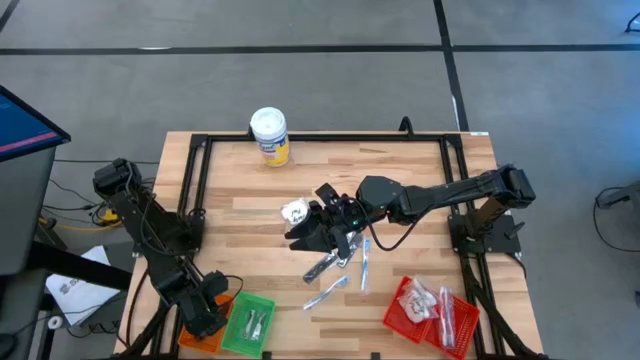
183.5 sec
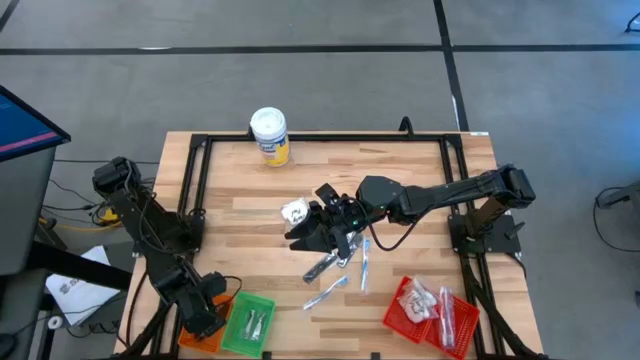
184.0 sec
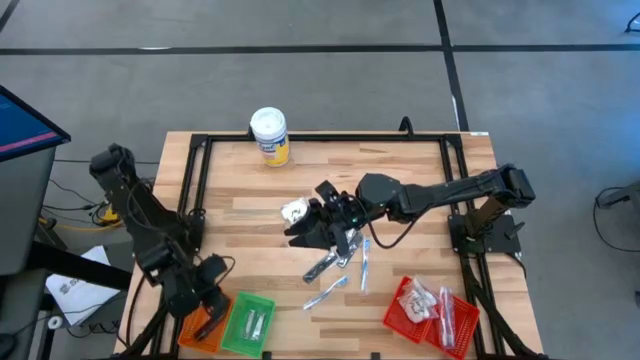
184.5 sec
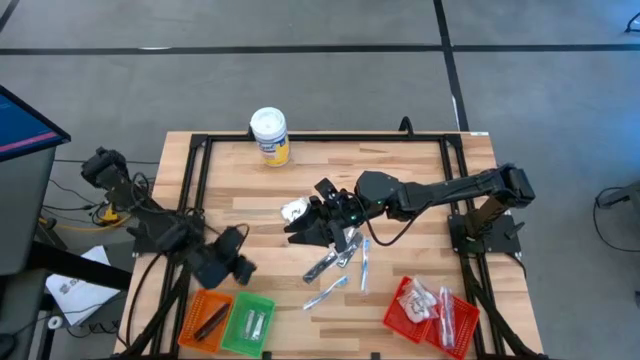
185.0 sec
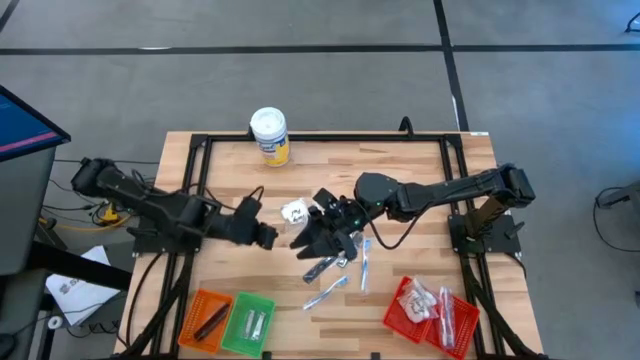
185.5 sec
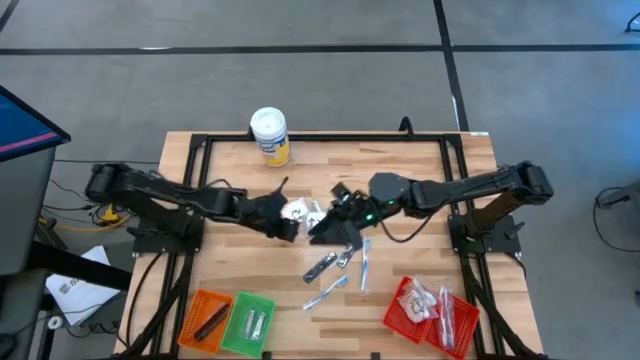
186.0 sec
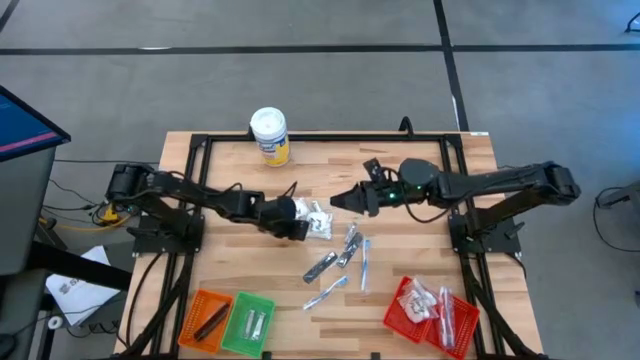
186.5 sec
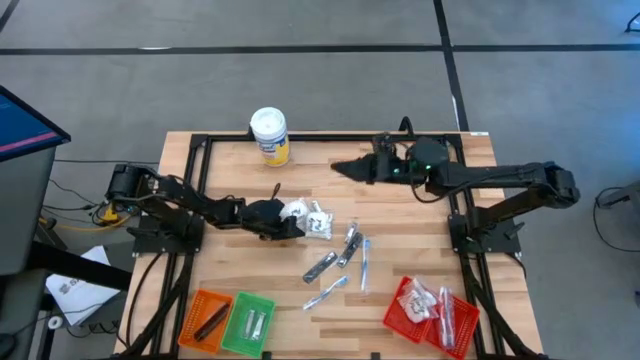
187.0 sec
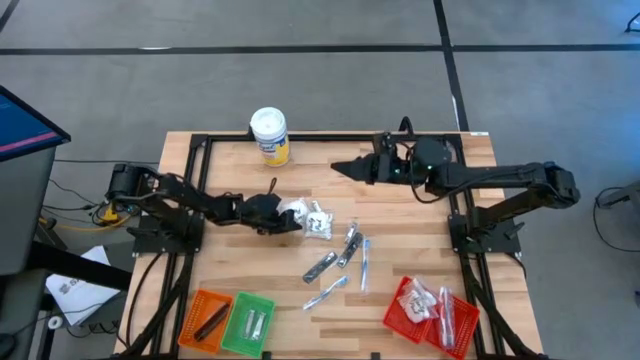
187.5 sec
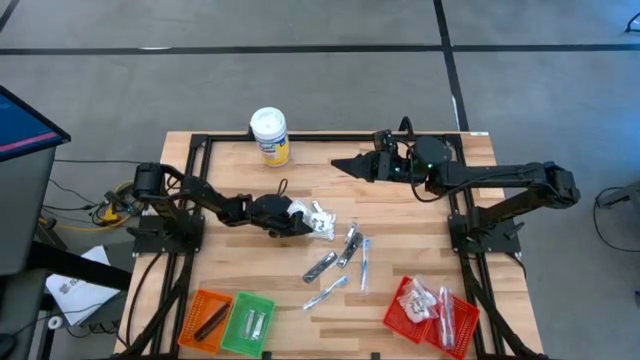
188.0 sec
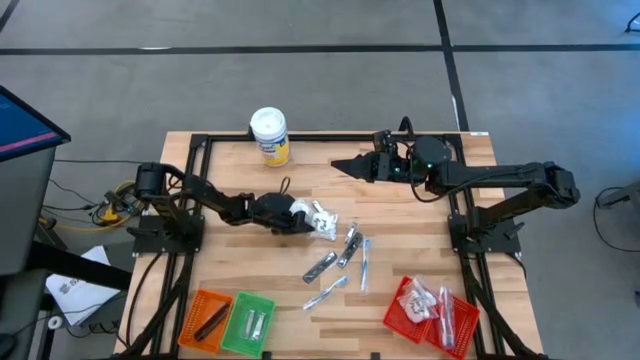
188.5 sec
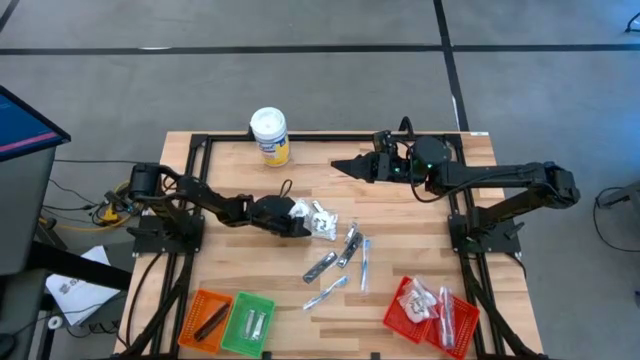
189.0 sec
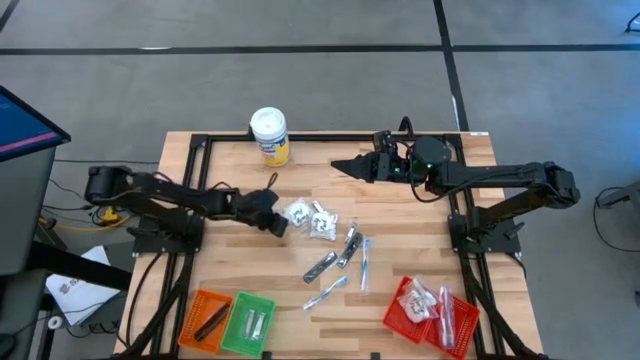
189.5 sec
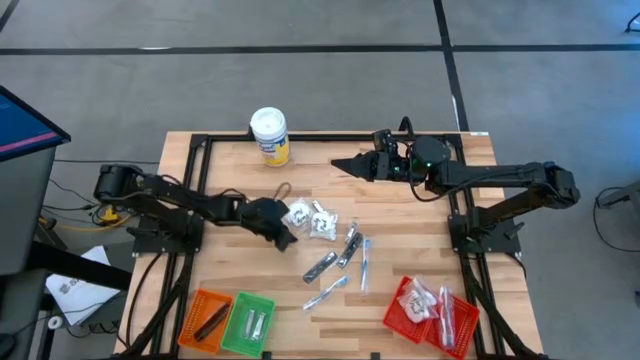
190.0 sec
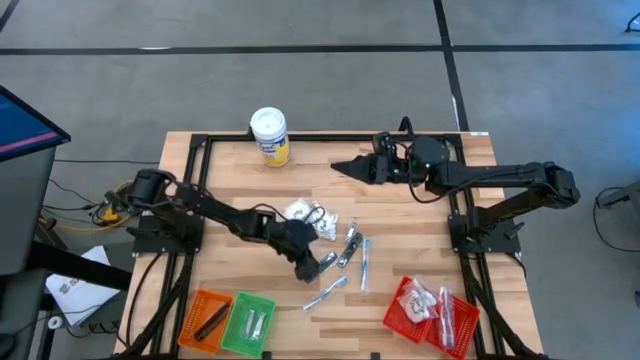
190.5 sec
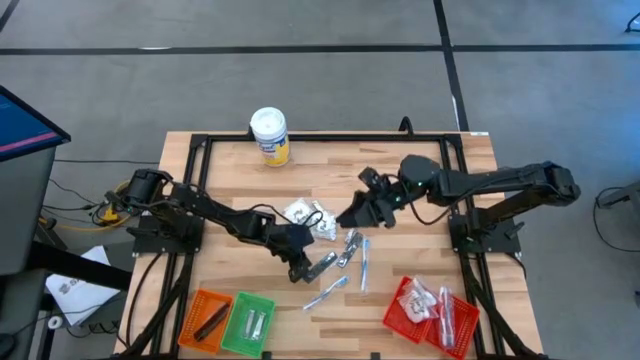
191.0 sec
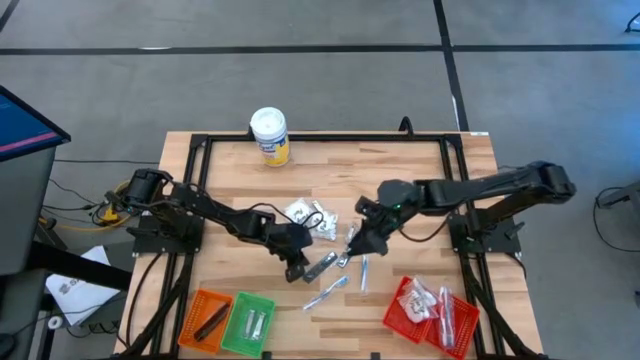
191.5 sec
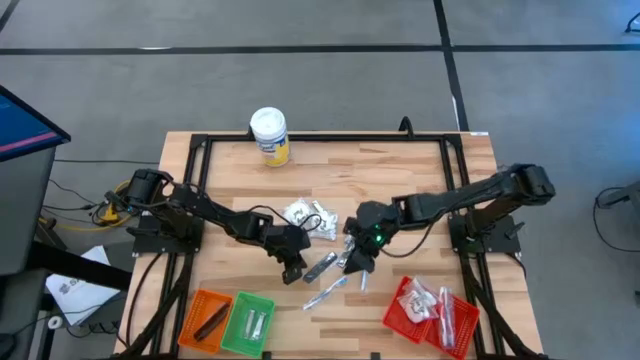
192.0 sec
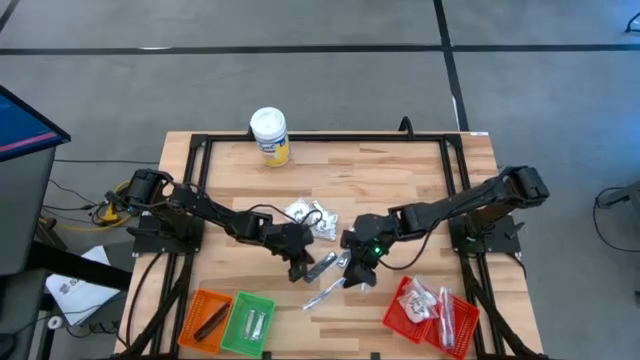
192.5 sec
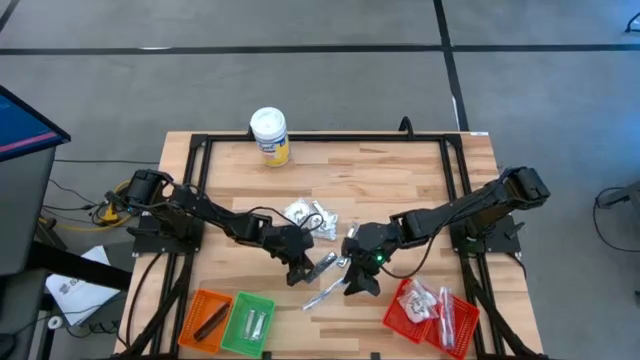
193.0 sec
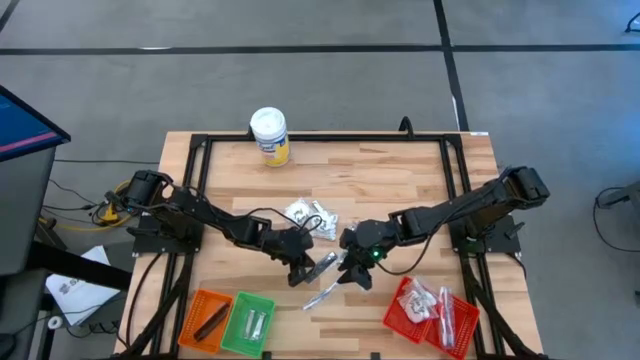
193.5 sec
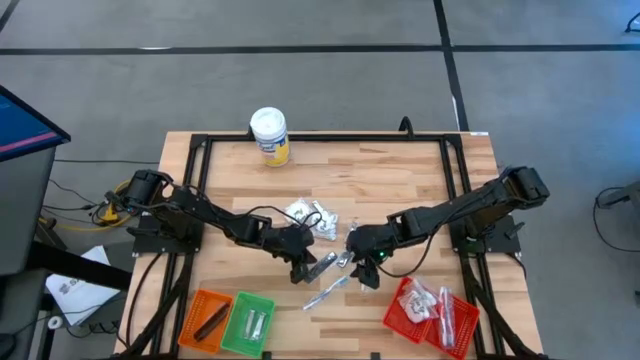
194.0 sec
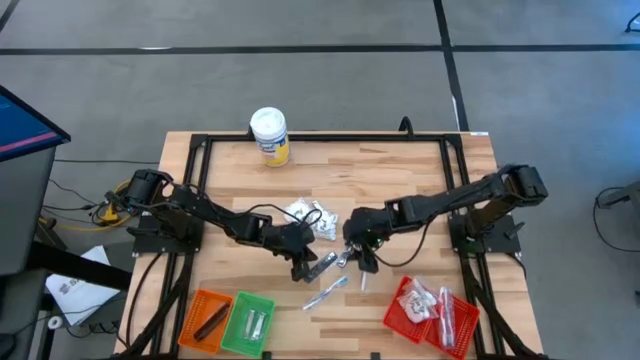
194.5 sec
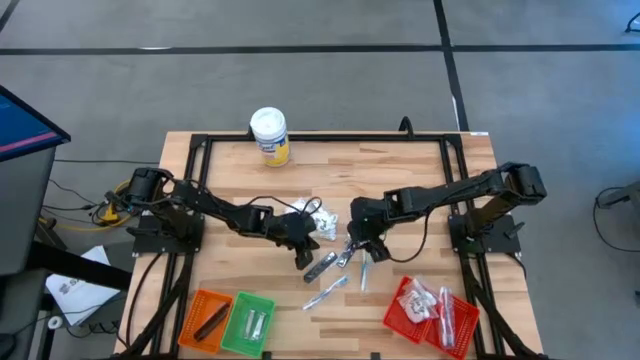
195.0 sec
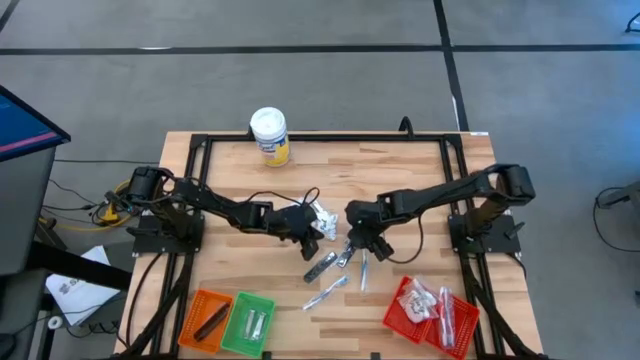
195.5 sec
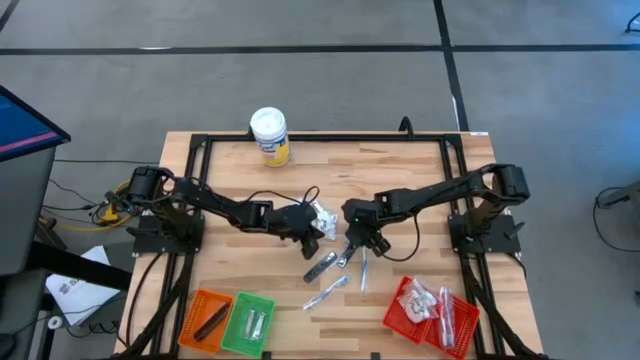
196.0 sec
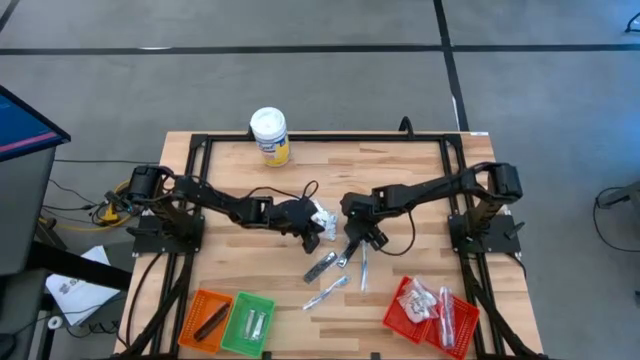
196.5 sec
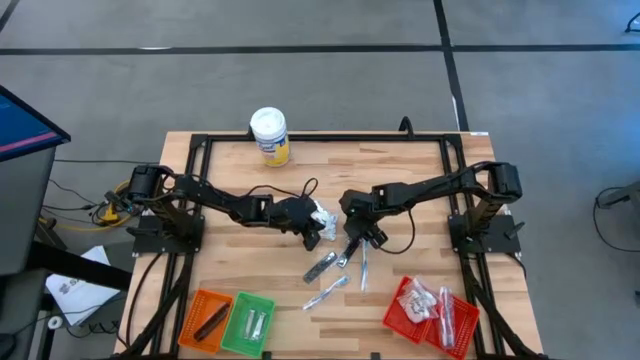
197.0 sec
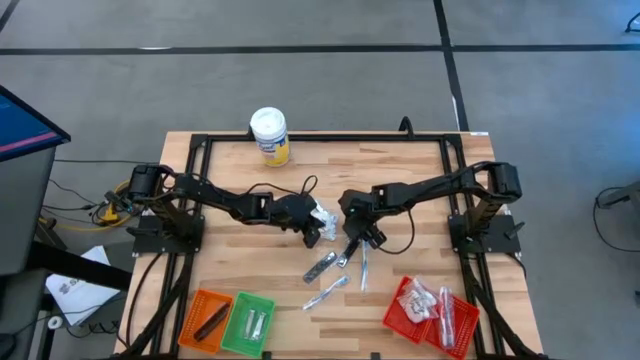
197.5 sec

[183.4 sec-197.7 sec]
Task: Pick & Place Travel size toiletries
Put the nail cutter into the green basket

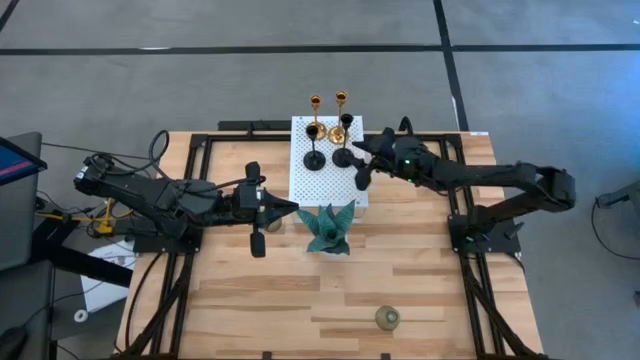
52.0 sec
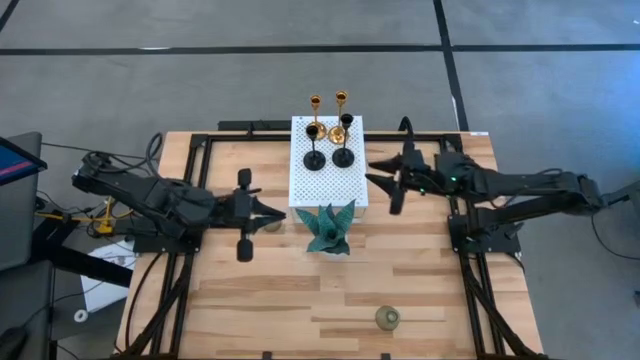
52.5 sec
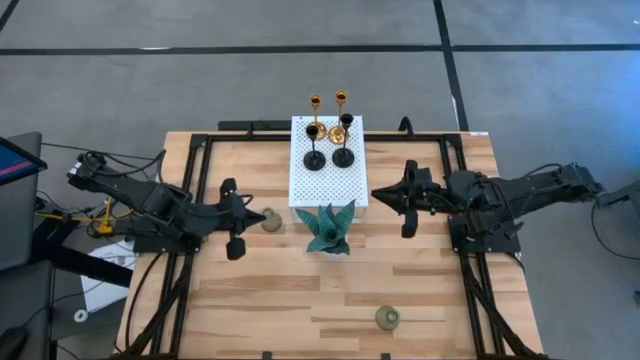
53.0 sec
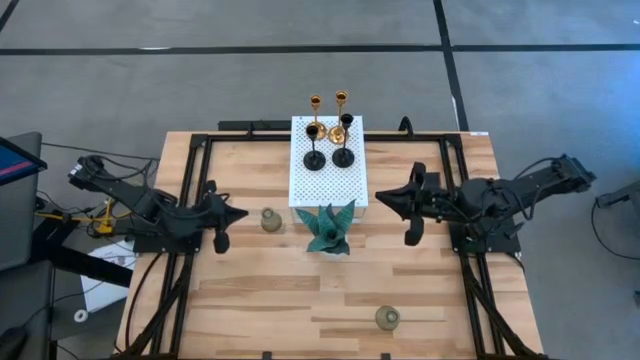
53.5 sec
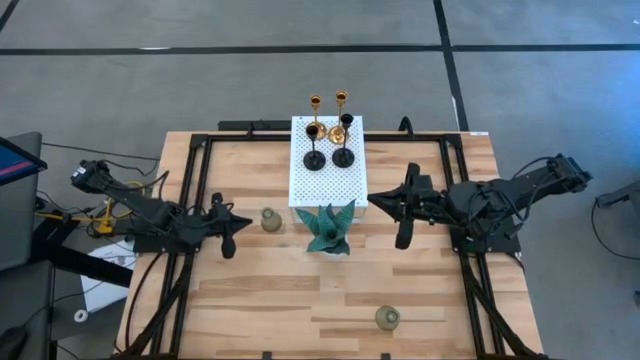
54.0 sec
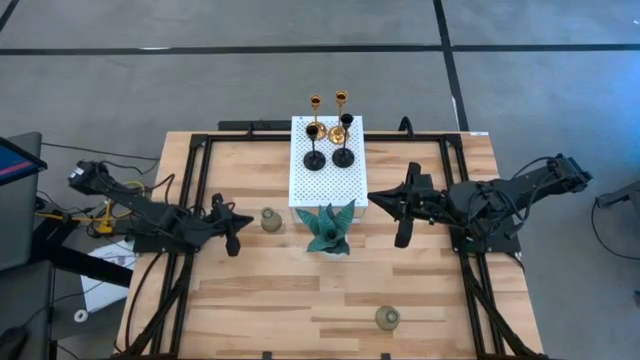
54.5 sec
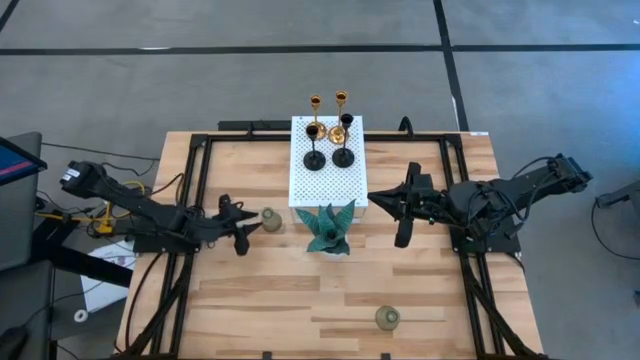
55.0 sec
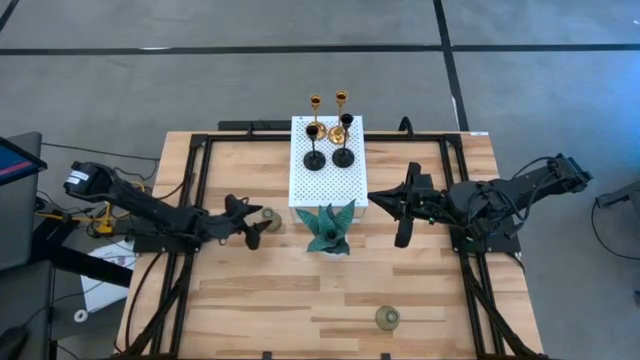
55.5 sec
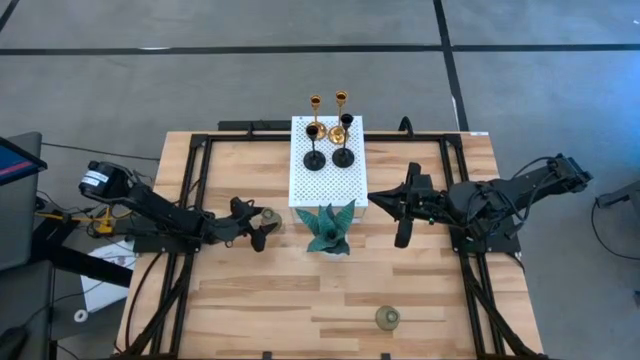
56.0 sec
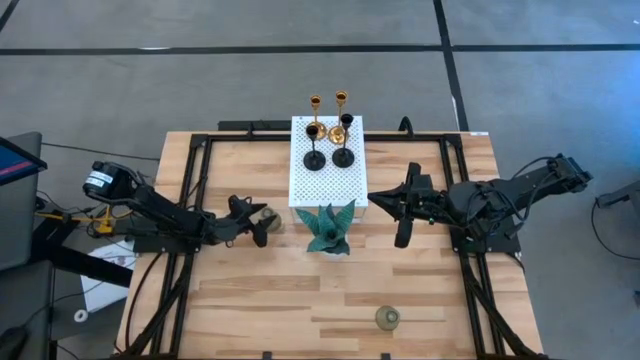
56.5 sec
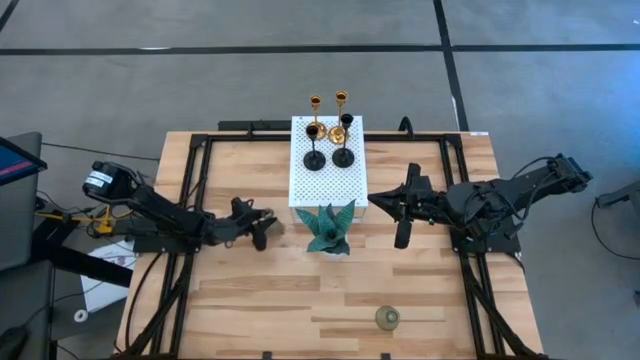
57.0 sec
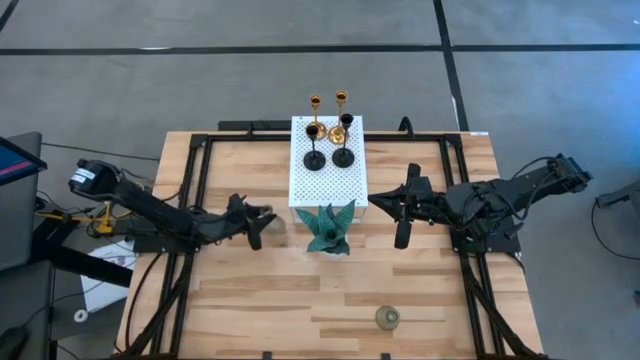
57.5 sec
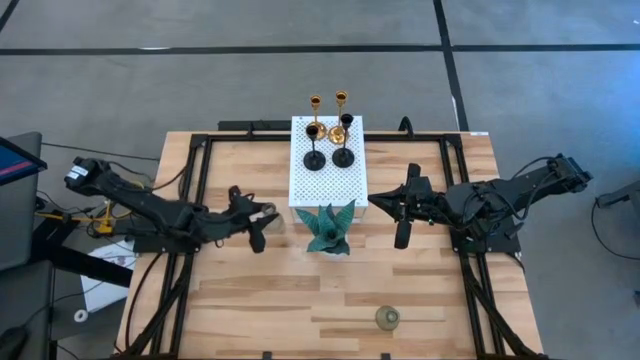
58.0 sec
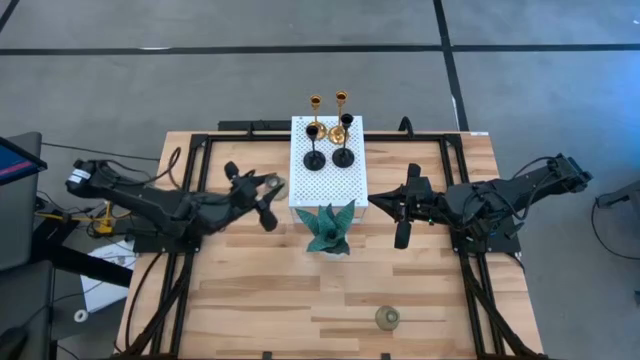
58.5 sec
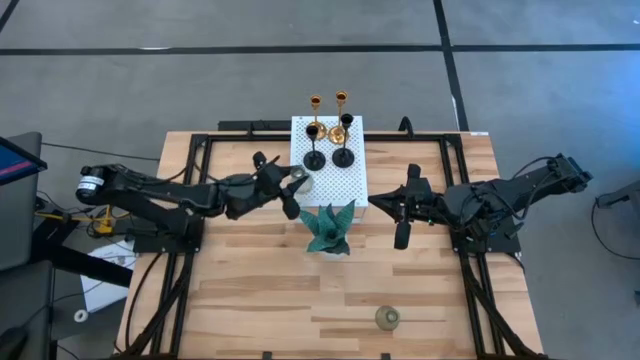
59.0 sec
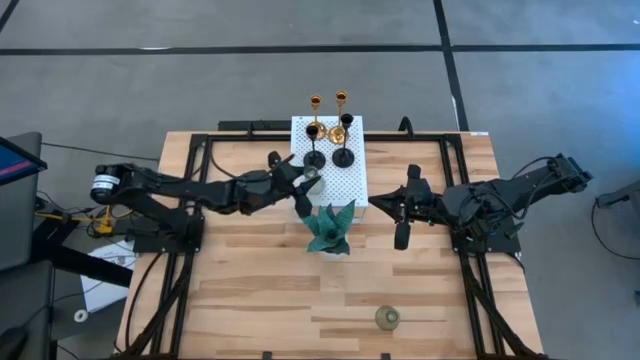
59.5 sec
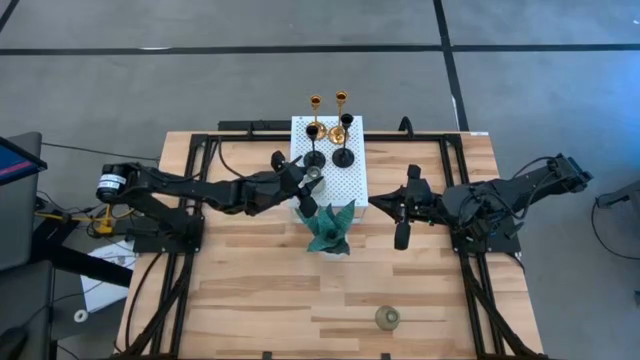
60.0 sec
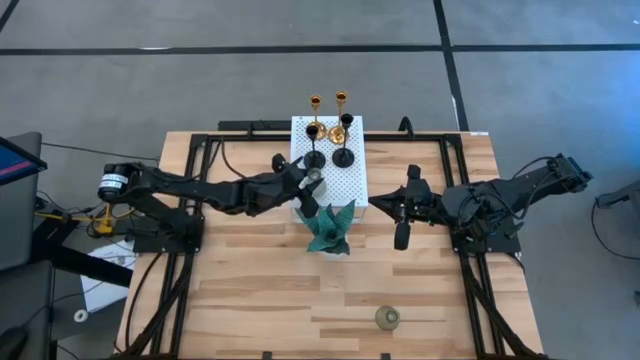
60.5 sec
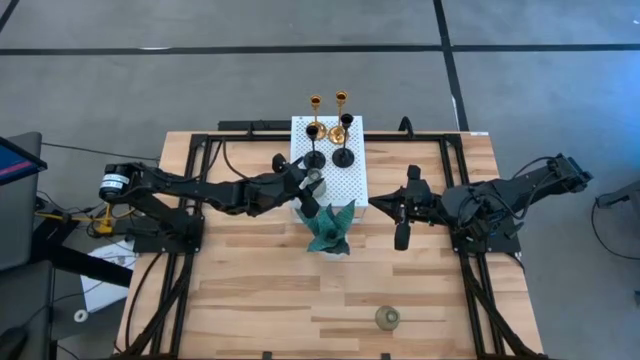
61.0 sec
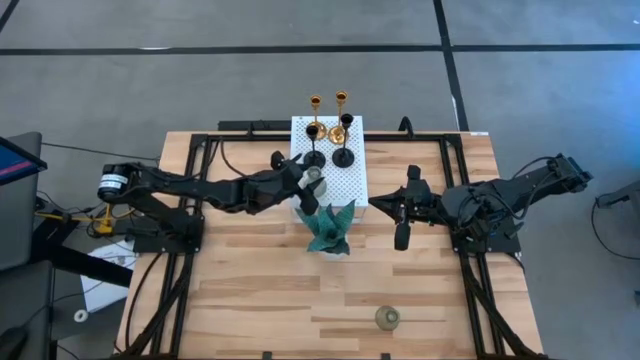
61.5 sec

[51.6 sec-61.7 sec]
Task: Pick & Place candle stick holders
Put the top transparent candle holder on the shelf
